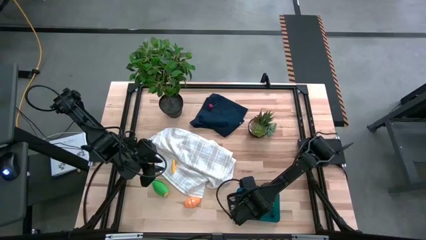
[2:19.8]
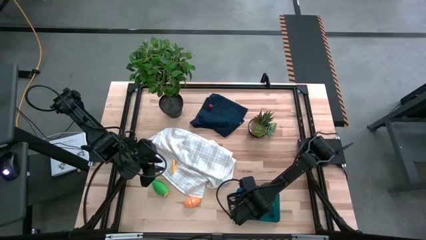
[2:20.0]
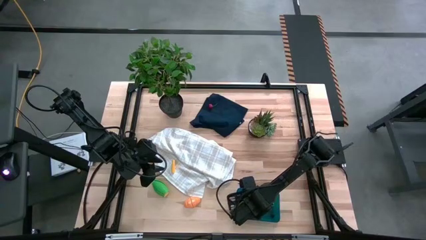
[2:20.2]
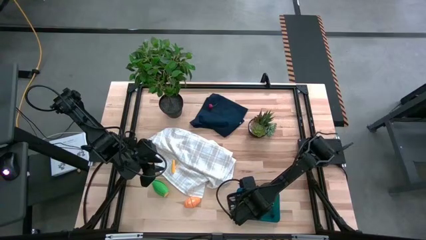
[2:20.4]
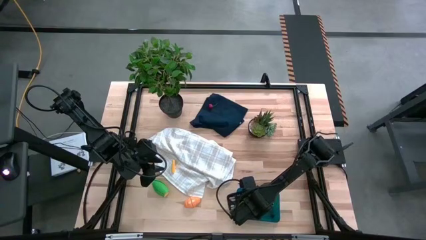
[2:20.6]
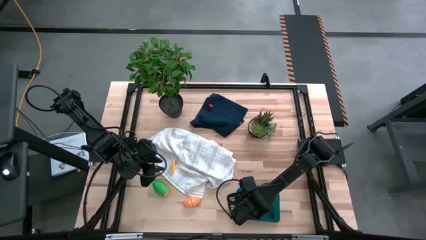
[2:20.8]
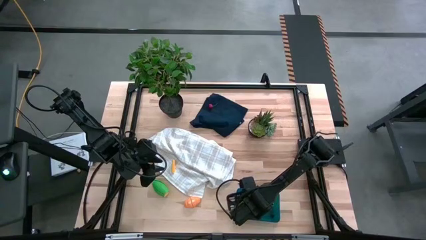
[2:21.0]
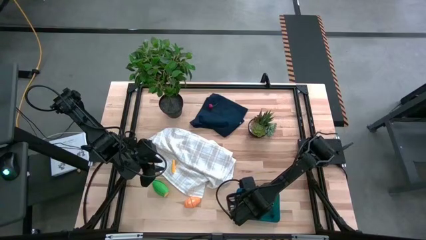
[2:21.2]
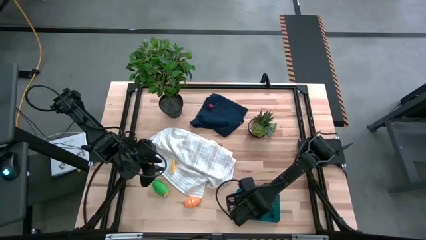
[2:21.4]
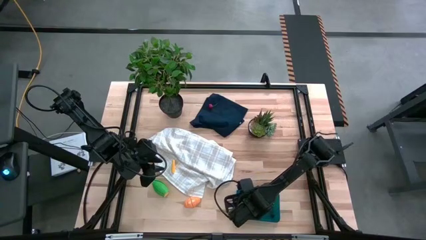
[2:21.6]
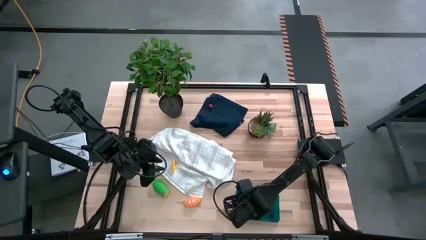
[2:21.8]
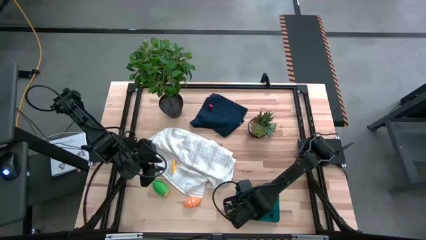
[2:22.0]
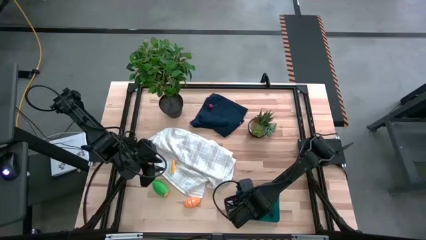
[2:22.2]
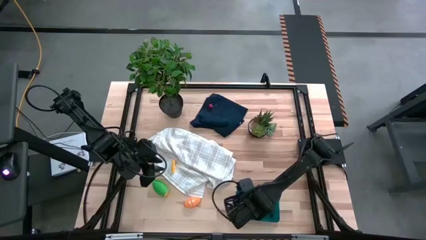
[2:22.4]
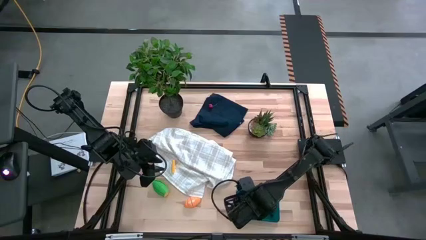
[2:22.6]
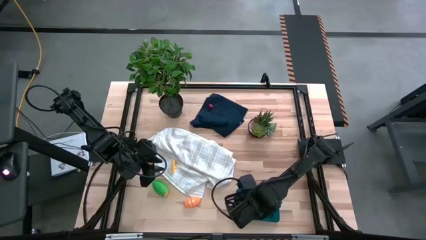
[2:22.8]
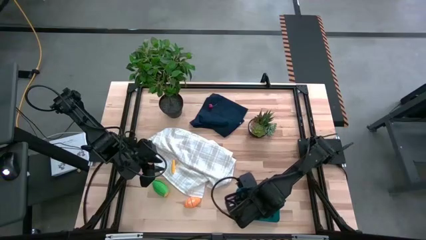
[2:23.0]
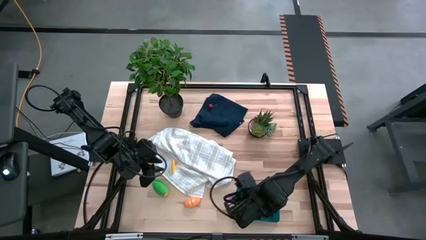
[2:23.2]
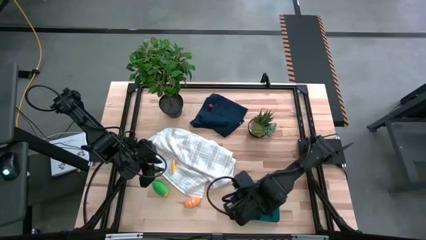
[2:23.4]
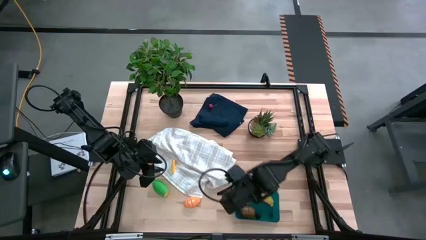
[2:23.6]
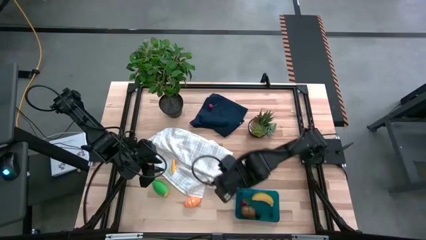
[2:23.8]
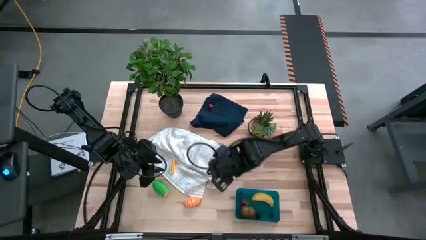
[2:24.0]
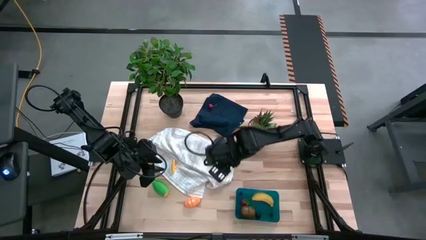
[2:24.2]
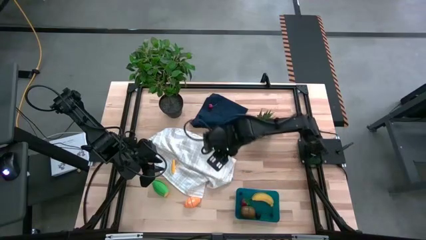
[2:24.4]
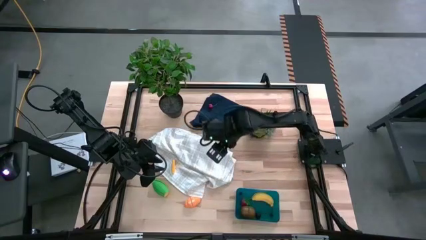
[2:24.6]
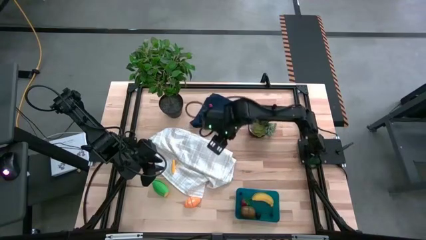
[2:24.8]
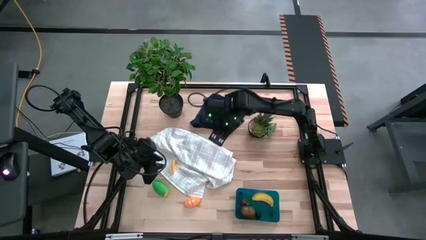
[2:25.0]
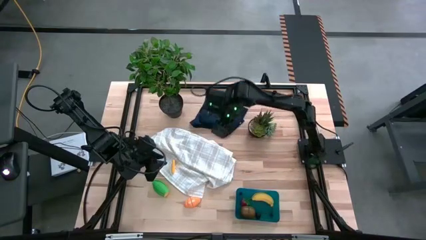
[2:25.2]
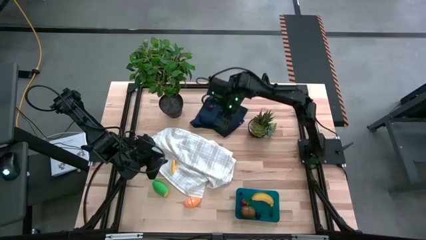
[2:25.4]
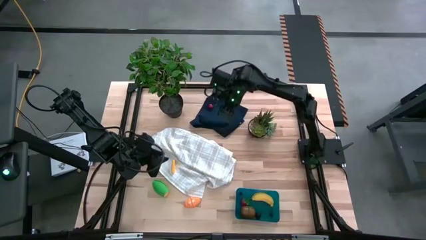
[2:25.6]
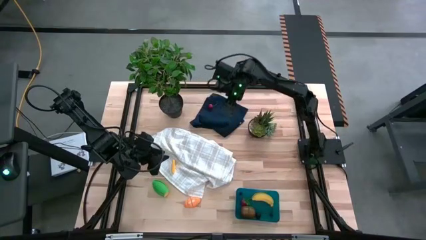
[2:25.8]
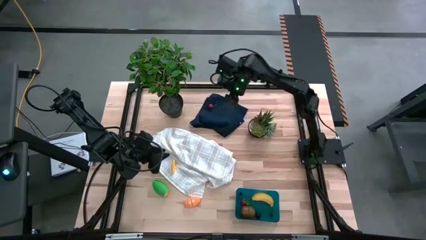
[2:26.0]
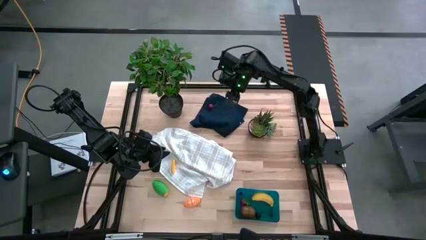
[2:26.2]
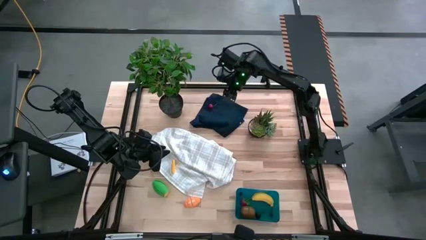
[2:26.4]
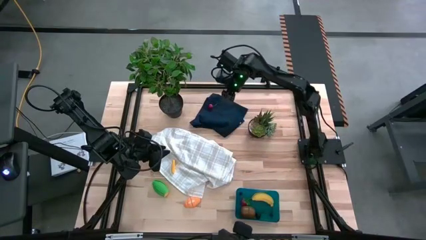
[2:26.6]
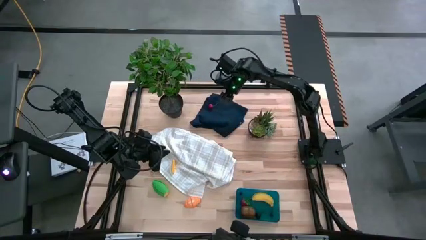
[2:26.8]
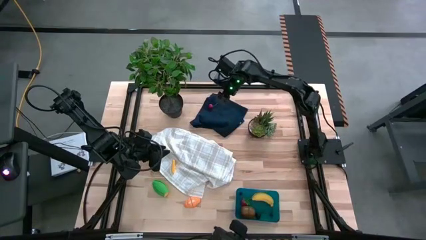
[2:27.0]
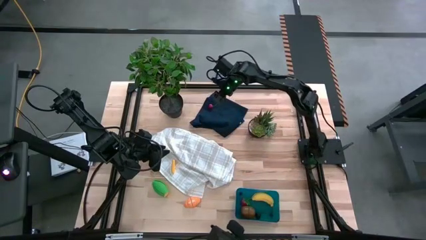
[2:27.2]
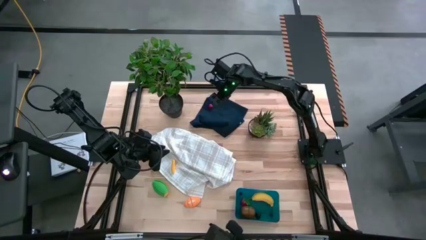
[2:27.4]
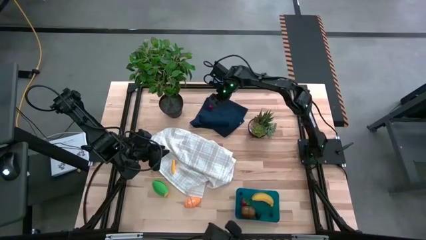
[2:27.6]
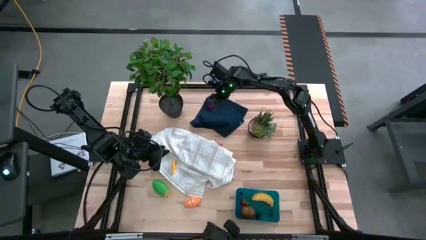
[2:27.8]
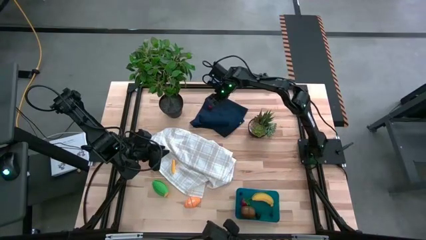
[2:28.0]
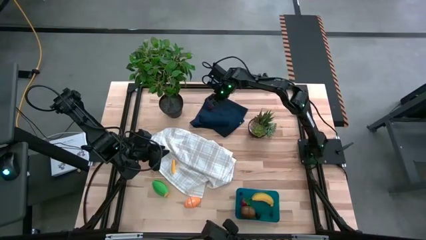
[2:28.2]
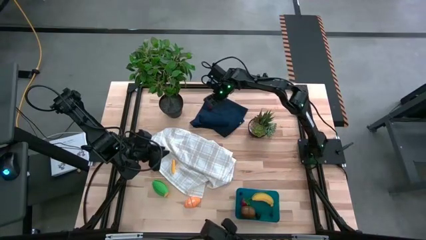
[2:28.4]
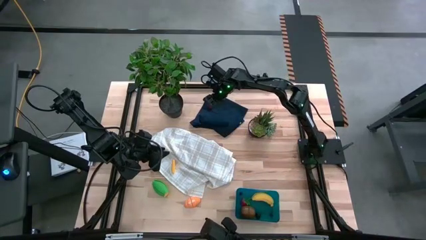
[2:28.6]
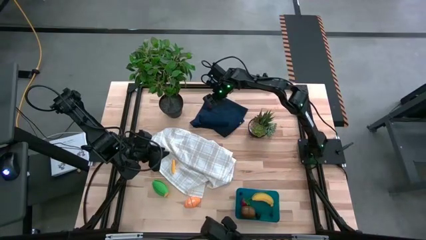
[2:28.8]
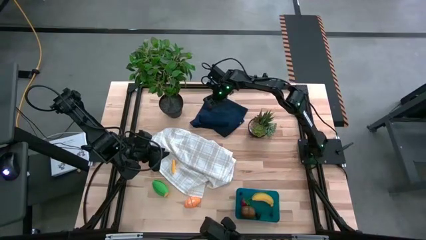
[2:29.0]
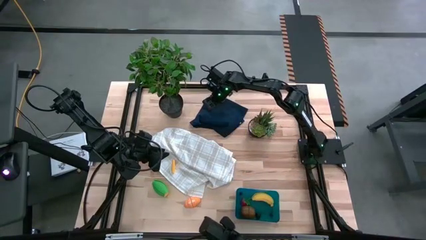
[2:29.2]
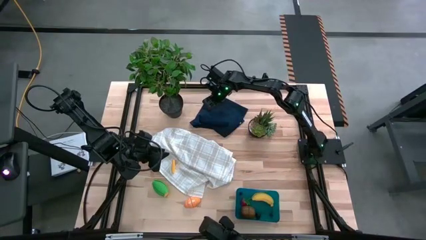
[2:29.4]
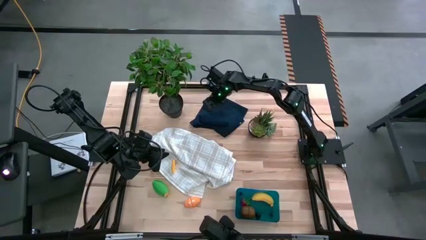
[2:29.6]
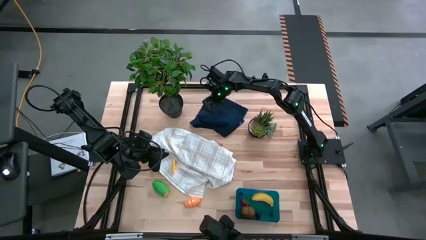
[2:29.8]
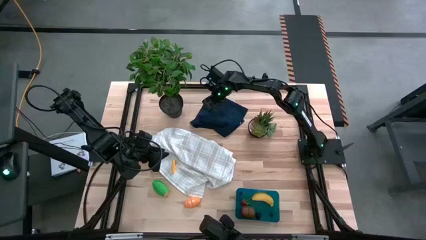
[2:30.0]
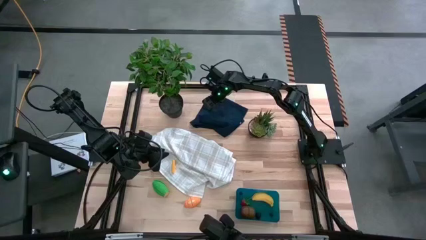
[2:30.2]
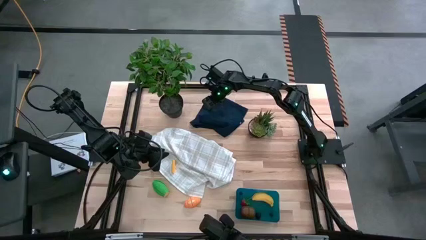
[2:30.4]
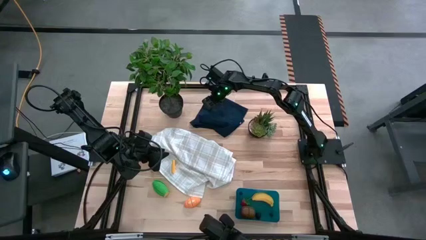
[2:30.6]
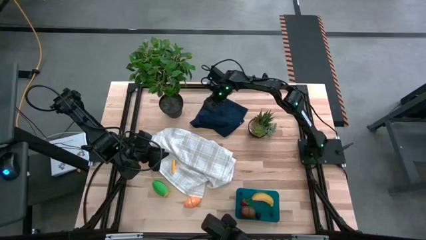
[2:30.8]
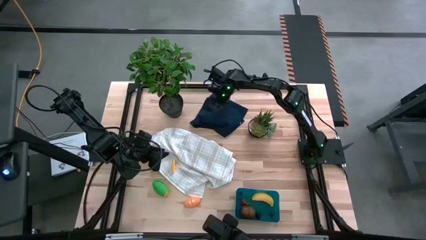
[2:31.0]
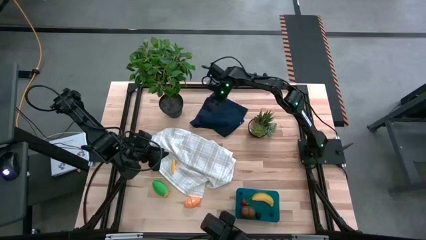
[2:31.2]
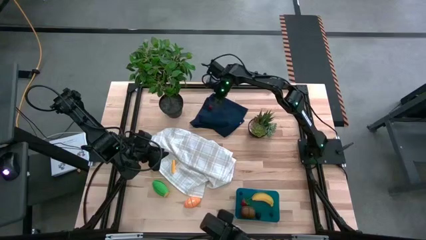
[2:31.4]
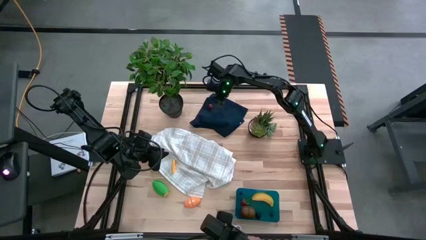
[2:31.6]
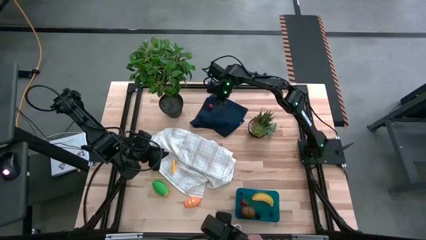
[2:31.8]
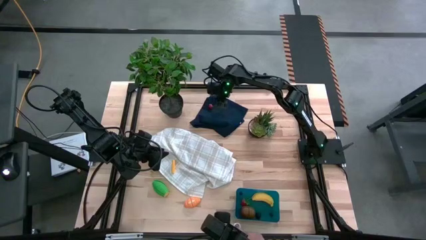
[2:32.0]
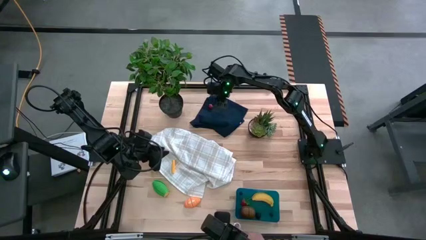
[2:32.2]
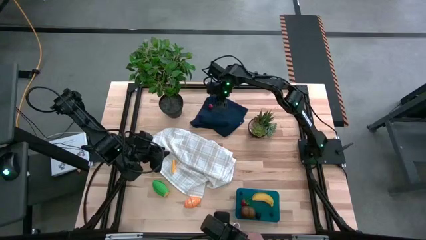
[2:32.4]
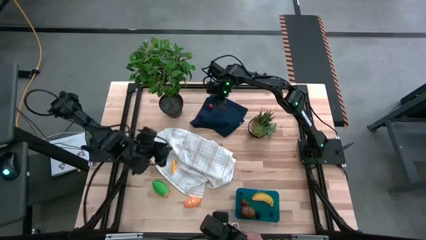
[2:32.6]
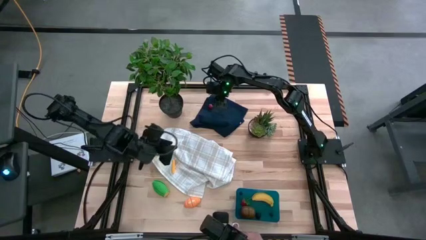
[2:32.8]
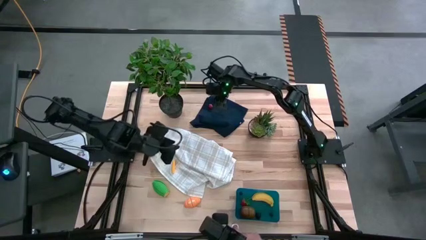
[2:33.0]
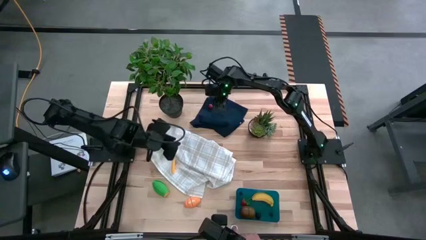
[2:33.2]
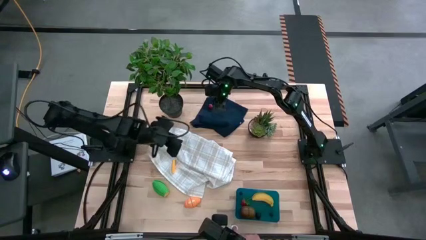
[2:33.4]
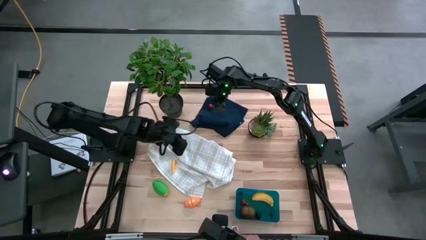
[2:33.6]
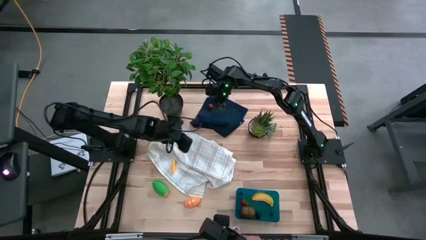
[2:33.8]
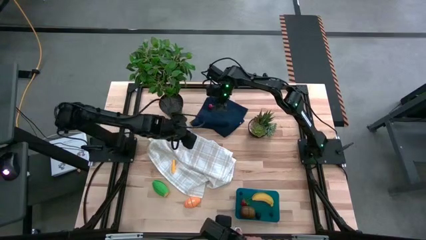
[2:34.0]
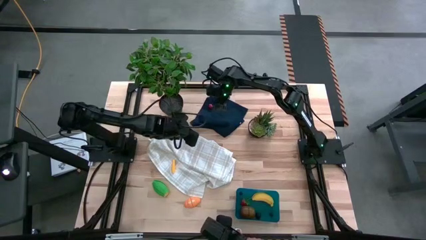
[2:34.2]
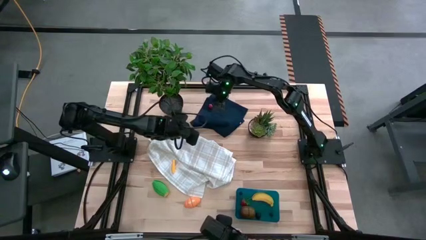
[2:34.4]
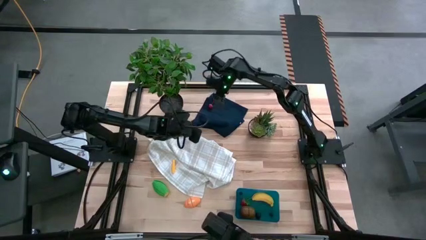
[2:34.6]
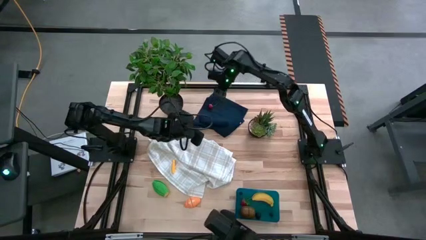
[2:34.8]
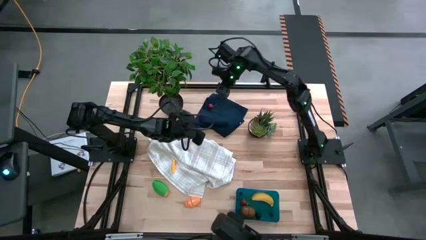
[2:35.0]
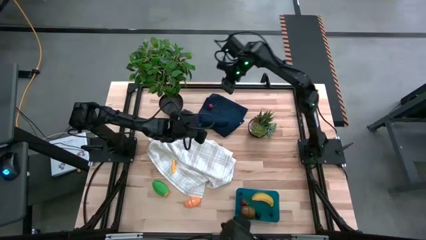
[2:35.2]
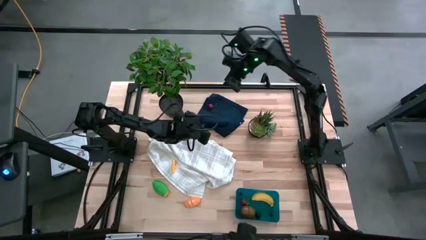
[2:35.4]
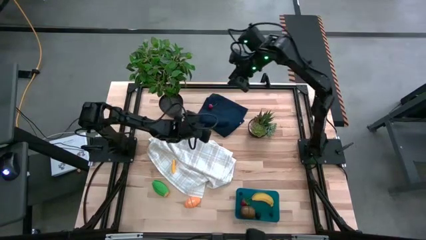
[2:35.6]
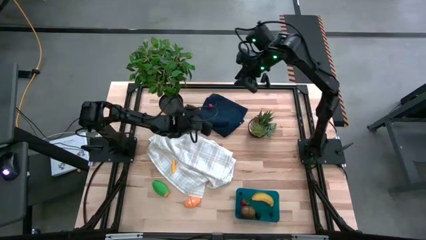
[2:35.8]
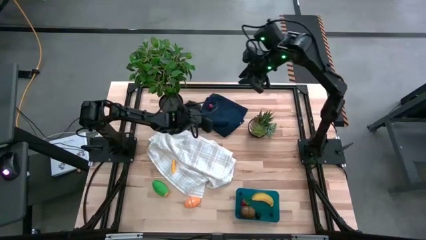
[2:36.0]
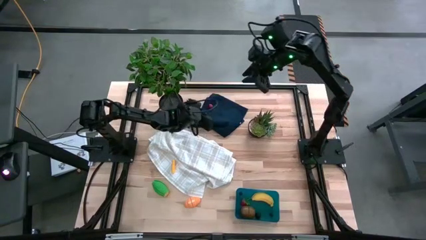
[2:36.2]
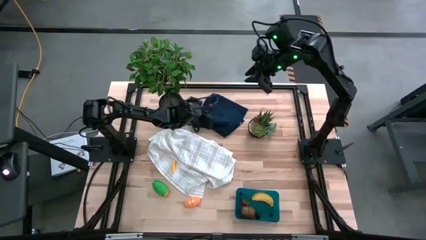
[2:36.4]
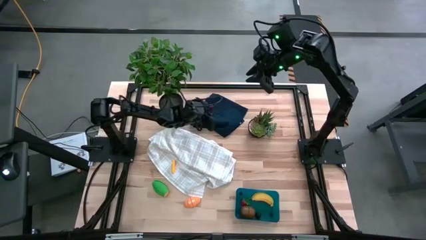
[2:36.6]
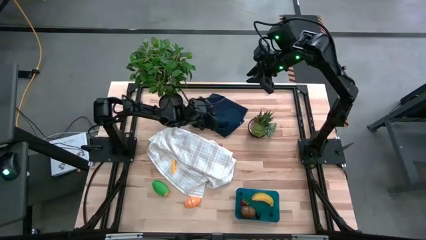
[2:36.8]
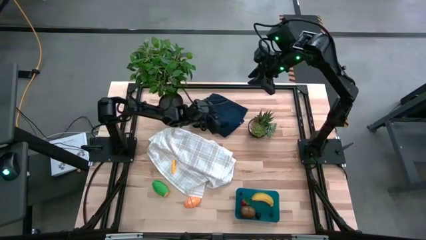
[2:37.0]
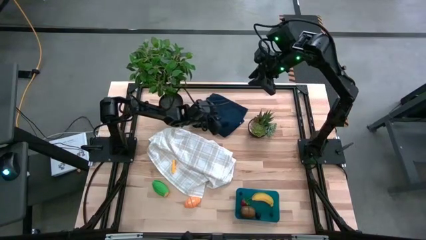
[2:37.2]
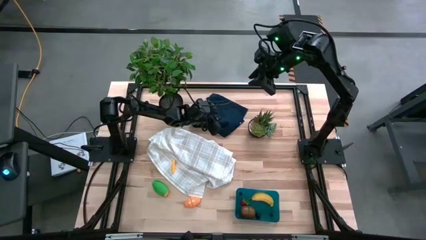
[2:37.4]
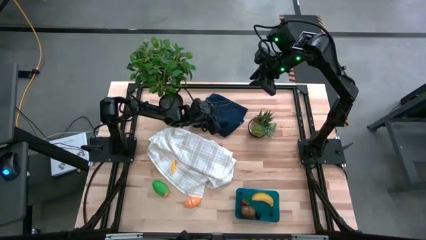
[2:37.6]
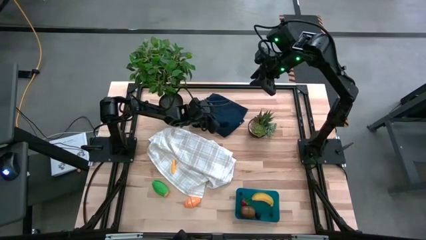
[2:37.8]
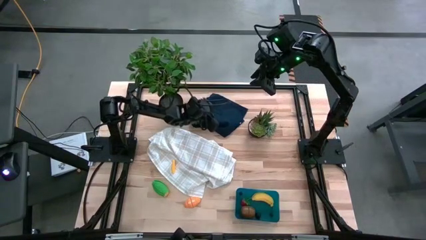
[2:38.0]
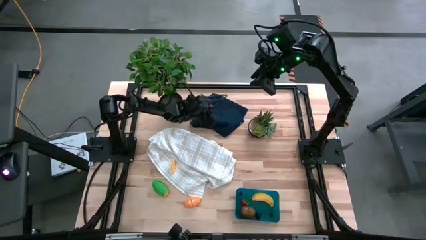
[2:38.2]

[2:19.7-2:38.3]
Task: Pick and placing Produce into tupperware
Move the left plant pot to the top left of the table
